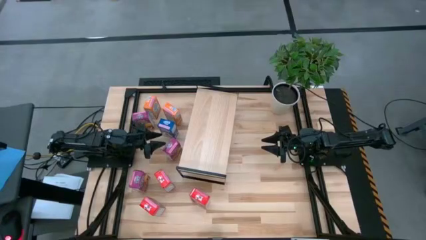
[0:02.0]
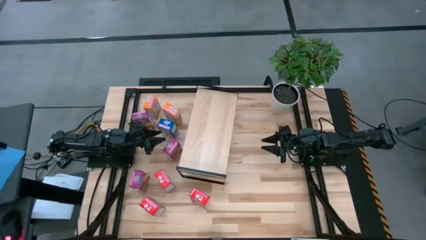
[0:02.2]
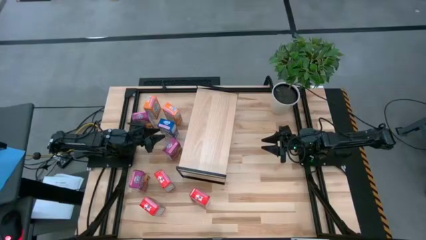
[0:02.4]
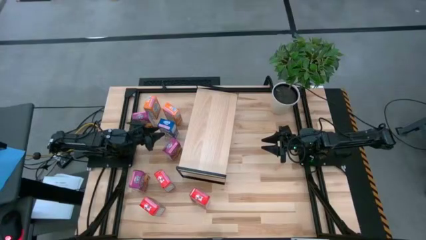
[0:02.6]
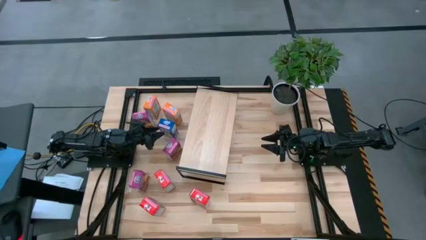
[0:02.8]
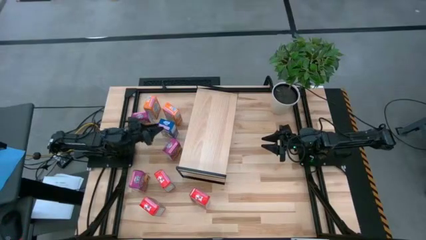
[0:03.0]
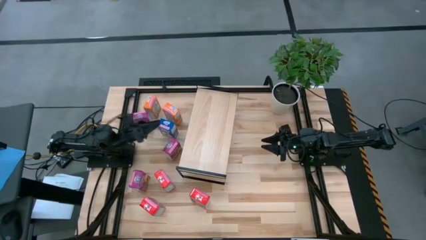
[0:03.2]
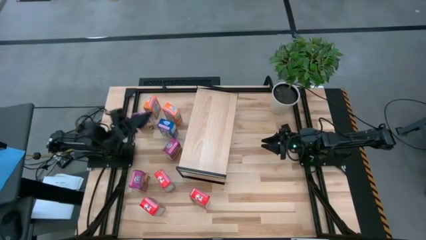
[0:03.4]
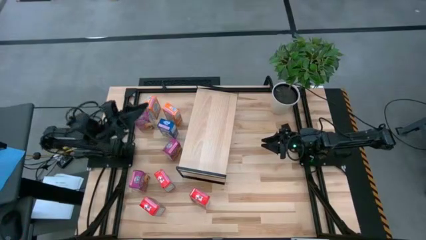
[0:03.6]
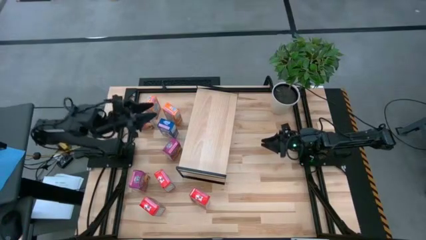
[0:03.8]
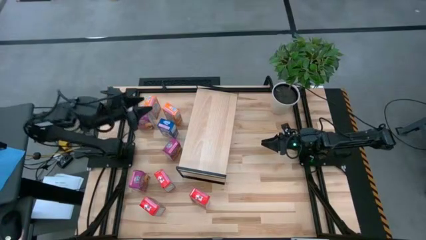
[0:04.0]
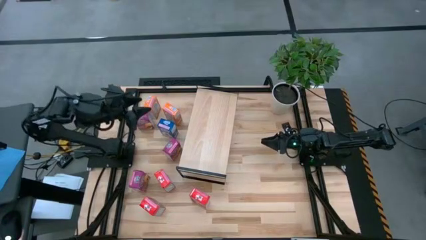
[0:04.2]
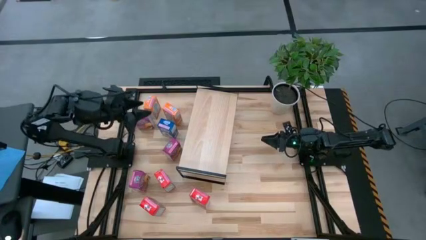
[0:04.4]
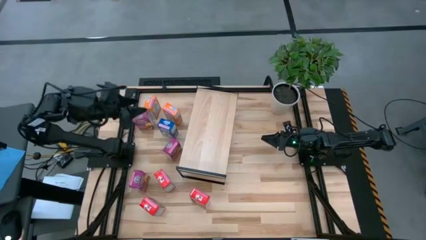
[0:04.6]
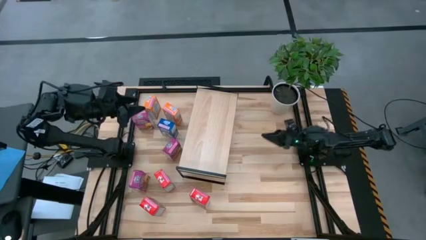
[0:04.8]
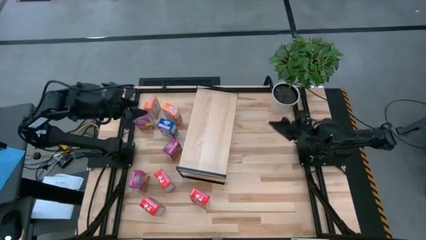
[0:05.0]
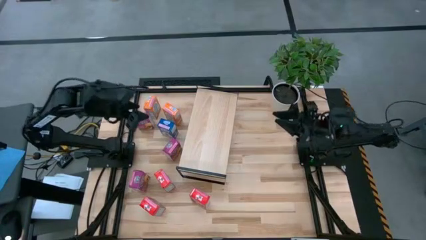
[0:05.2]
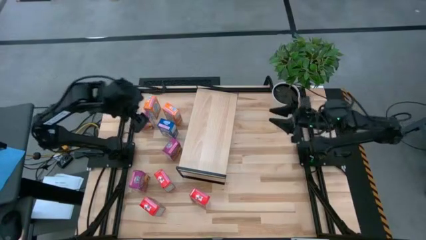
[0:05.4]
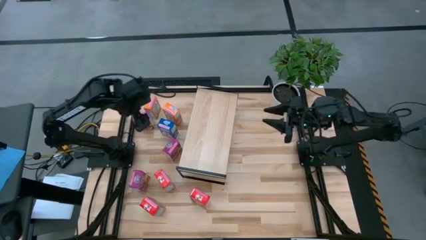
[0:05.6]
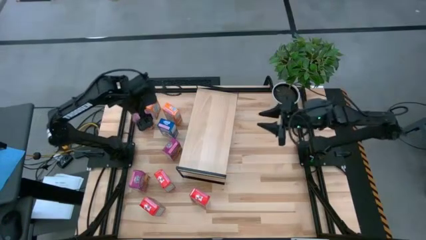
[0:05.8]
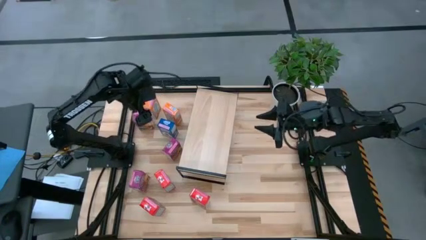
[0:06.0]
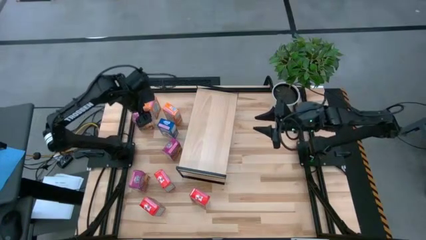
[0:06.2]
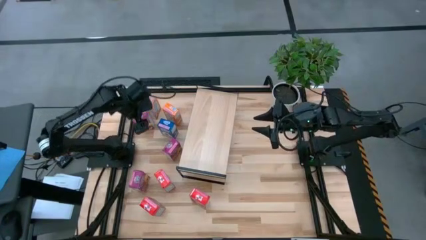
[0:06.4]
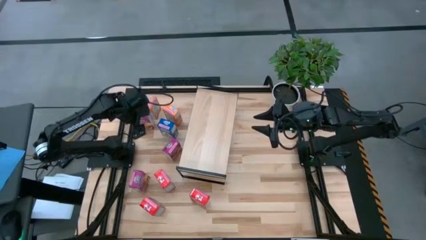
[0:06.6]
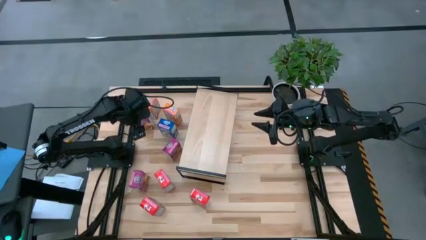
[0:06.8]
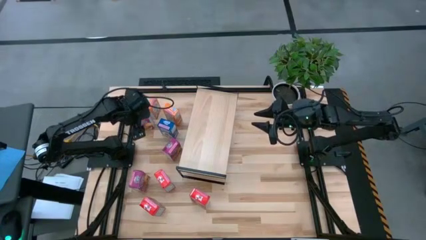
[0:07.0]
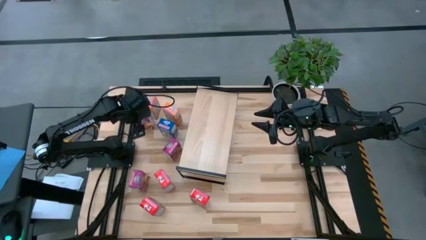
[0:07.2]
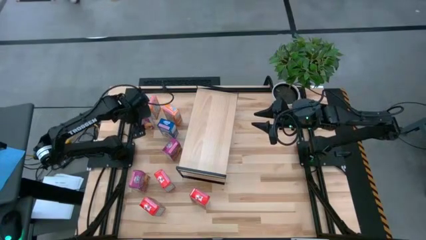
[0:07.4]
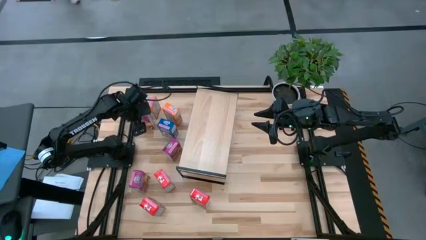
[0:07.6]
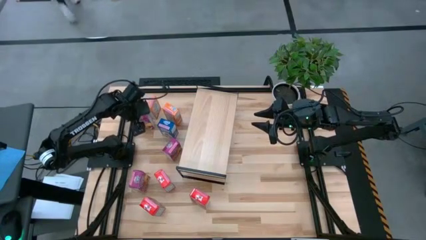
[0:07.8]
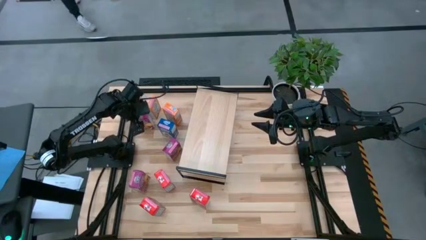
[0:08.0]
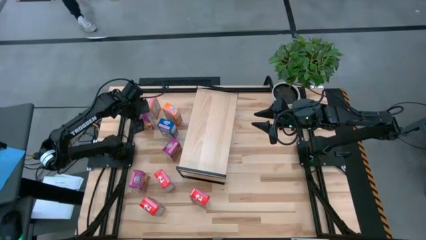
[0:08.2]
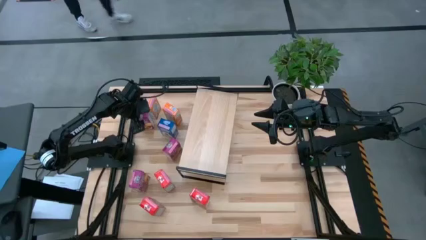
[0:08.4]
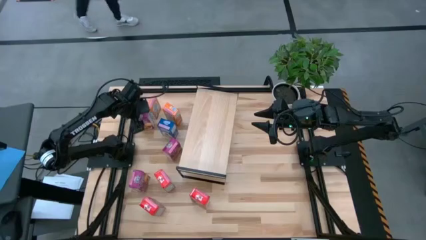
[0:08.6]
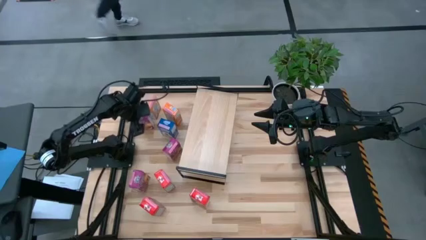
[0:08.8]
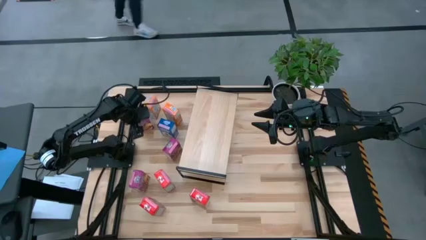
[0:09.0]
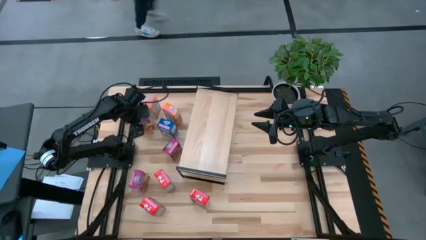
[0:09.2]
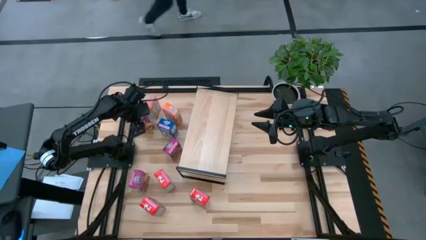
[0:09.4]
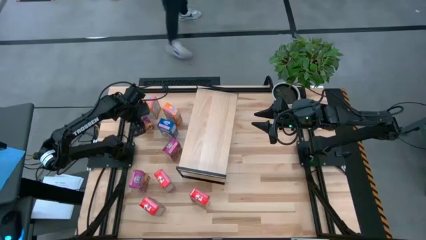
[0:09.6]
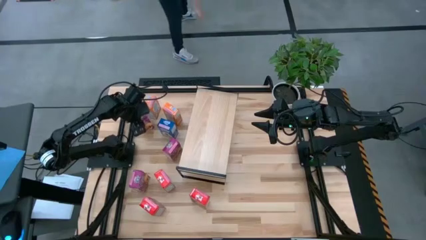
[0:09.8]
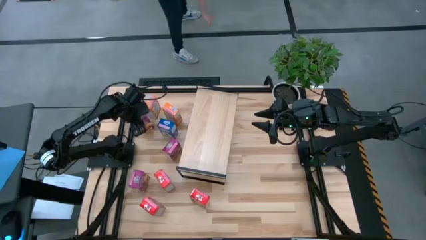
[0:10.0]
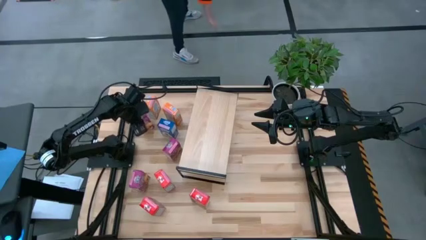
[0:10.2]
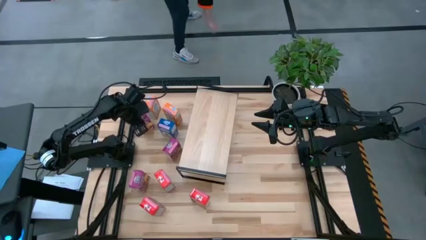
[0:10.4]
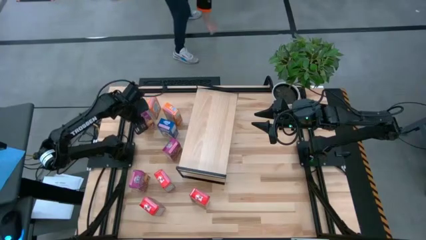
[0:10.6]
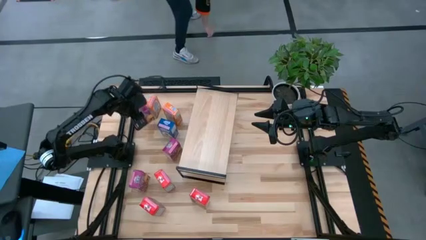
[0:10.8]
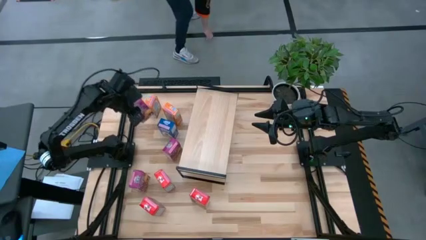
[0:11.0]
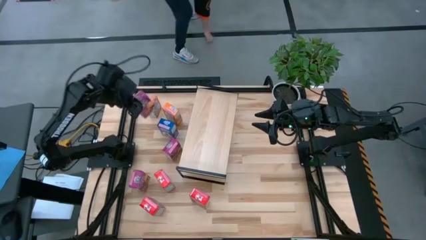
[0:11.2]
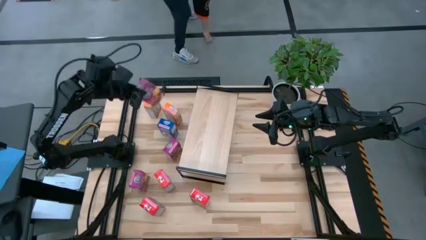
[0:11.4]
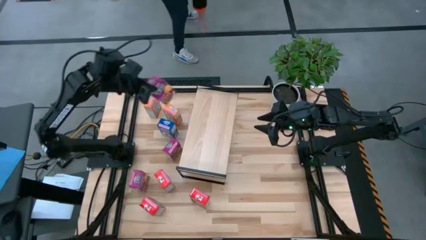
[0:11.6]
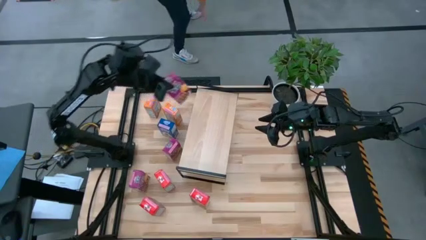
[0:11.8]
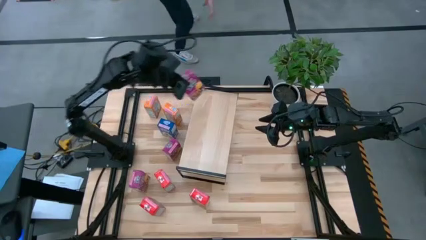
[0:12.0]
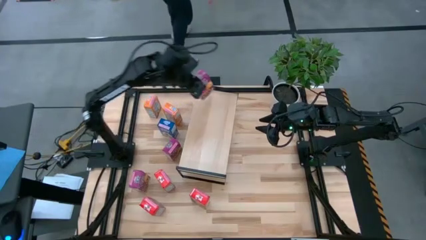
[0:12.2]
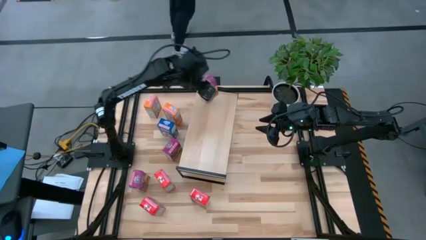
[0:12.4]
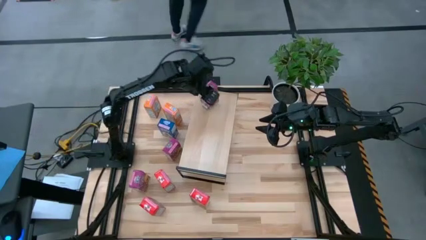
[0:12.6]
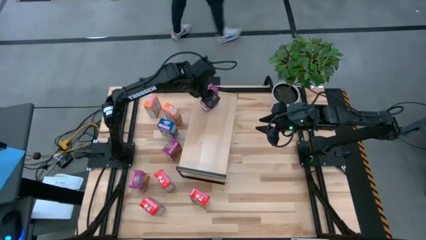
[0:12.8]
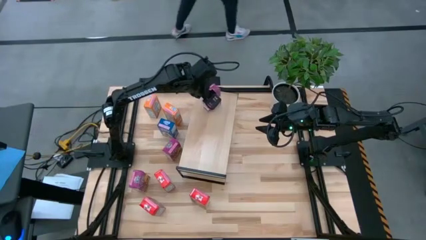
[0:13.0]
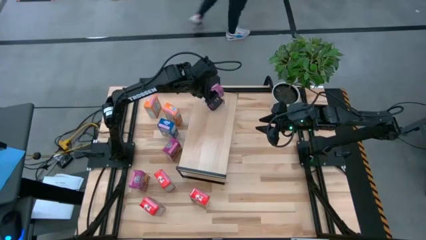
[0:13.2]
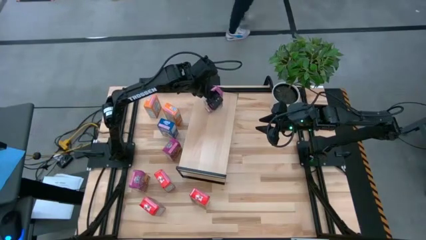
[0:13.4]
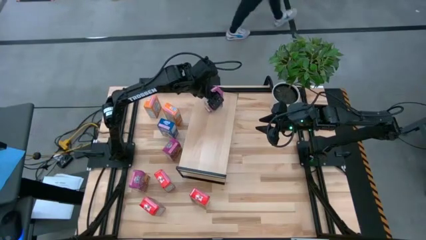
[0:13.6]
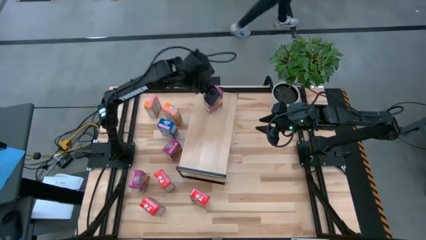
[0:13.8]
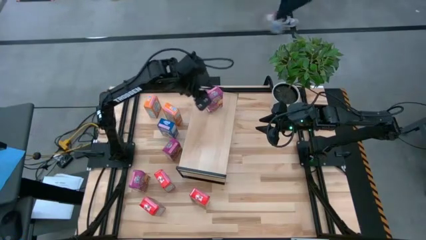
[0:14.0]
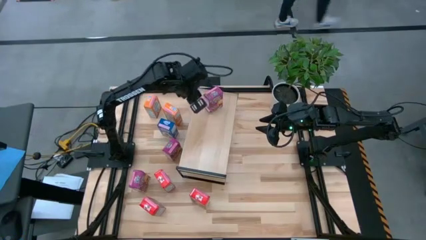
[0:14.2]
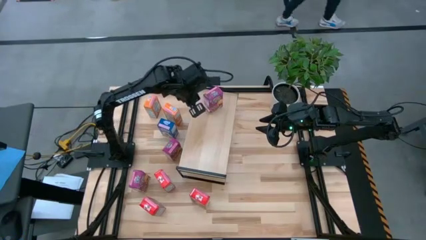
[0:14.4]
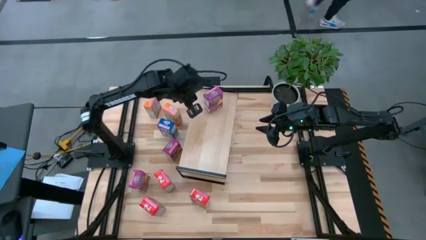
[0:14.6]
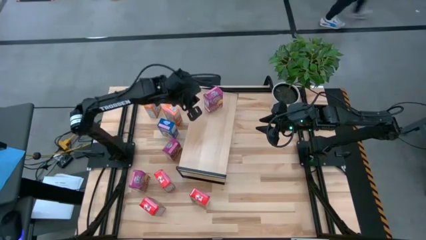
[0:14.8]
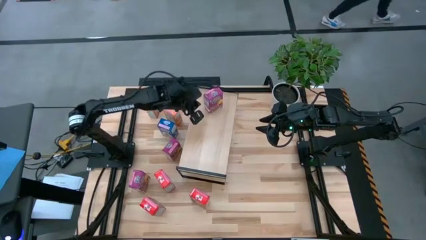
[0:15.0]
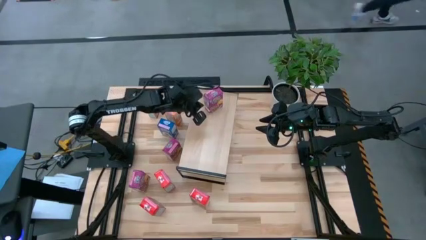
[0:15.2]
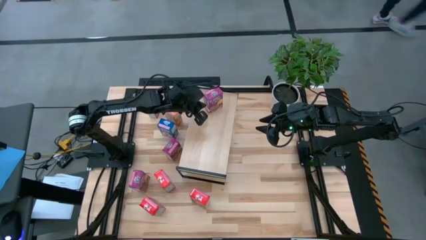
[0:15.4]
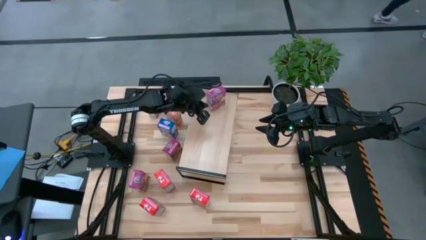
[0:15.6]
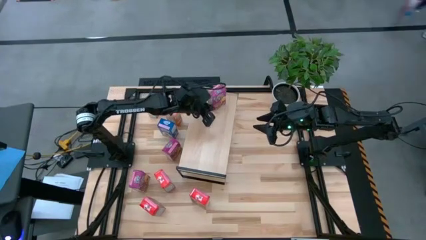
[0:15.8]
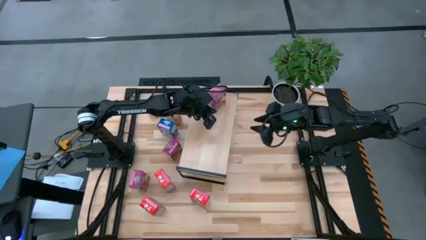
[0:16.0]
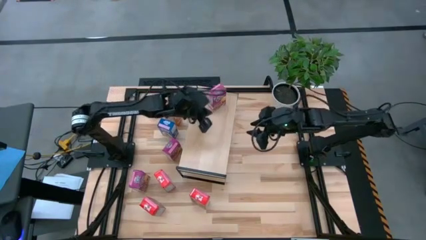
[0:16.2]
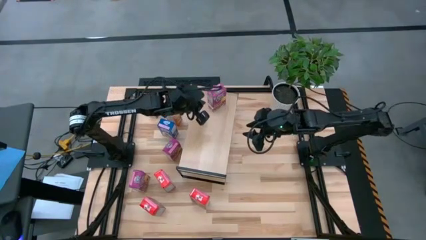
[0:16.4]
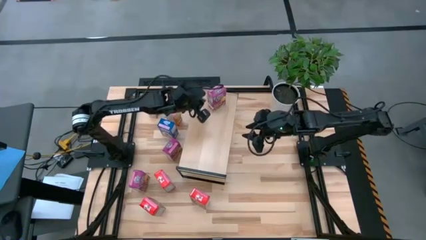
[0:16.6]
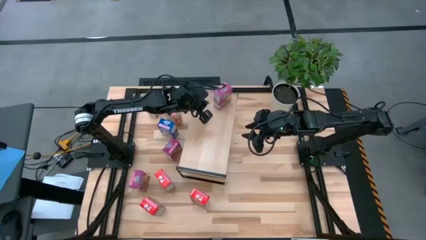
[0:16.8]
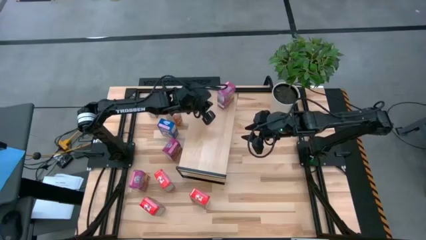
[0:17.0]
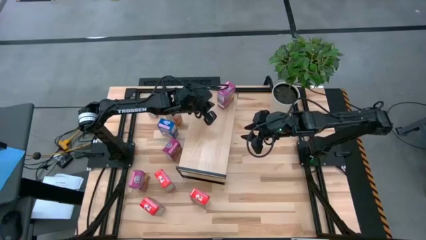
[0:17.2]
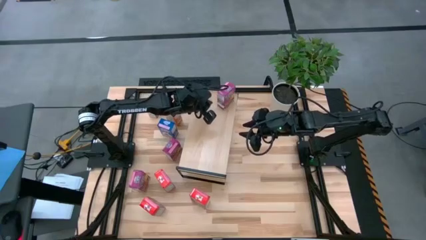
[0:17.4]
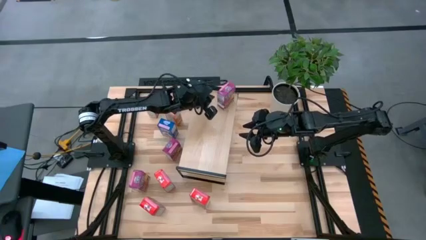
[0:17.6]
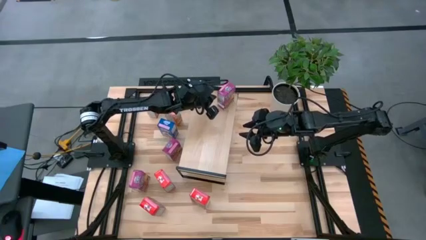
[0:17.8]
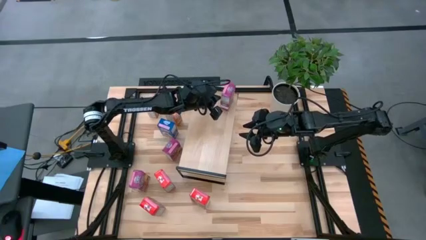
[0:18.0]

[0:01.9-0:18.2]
Task: Stack cereal on shelf
Put the top purple cereal box on the shelf
